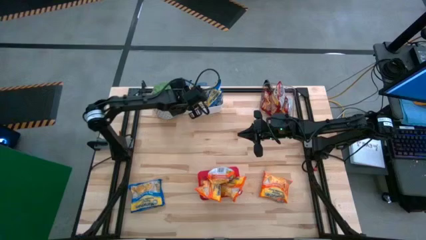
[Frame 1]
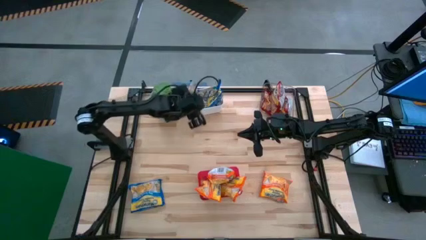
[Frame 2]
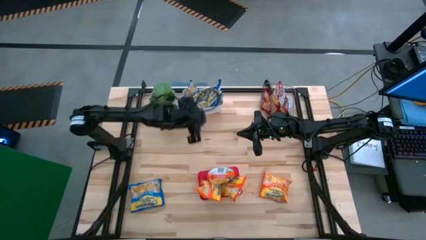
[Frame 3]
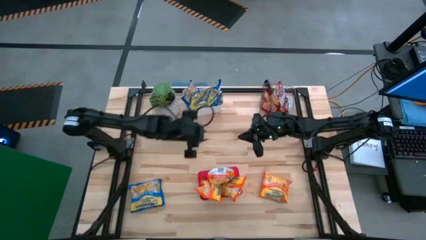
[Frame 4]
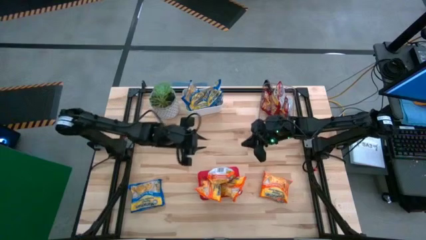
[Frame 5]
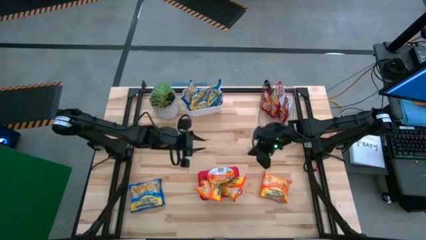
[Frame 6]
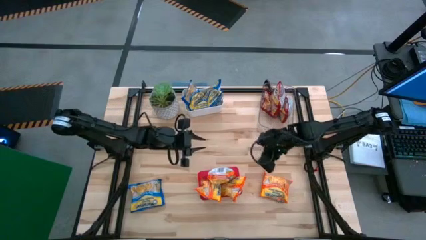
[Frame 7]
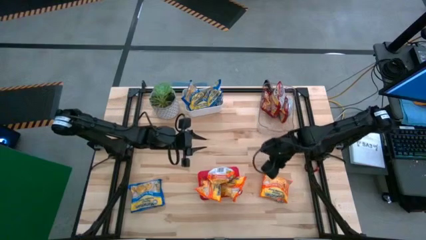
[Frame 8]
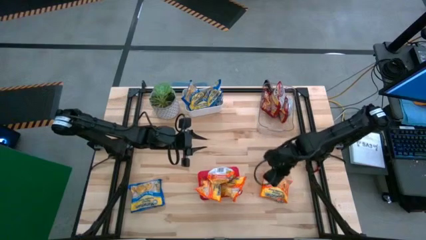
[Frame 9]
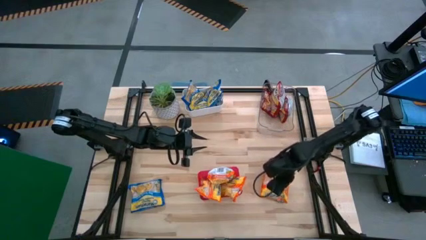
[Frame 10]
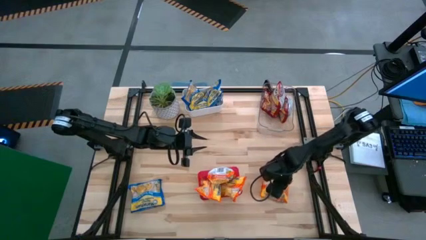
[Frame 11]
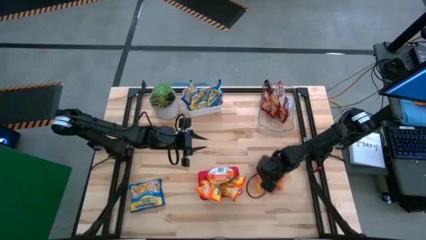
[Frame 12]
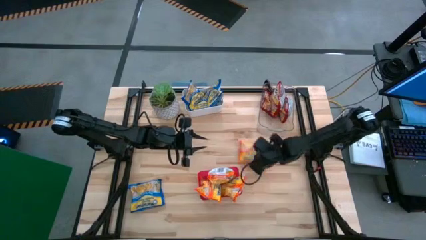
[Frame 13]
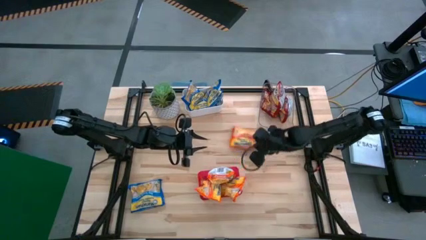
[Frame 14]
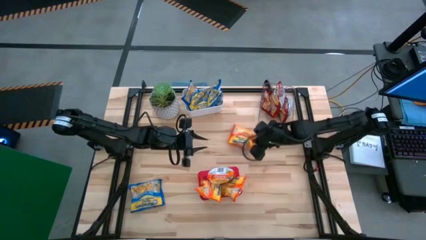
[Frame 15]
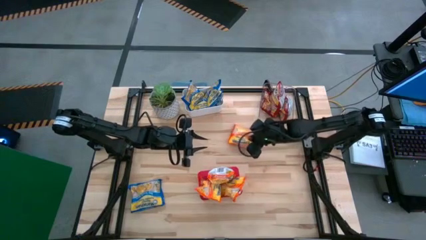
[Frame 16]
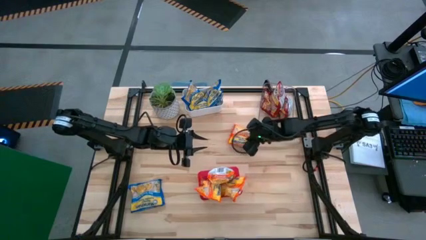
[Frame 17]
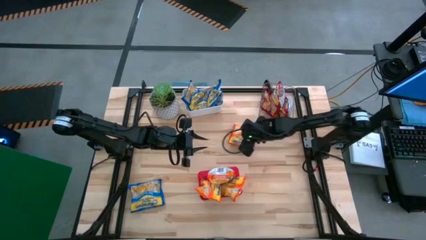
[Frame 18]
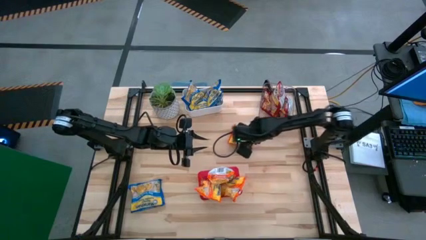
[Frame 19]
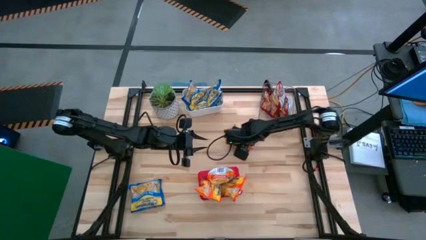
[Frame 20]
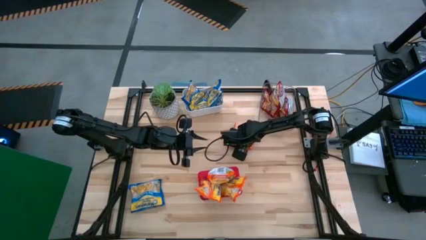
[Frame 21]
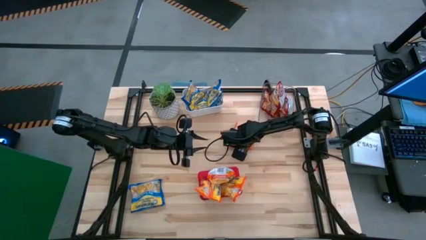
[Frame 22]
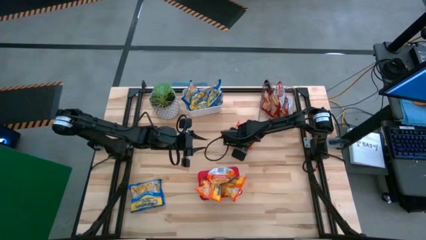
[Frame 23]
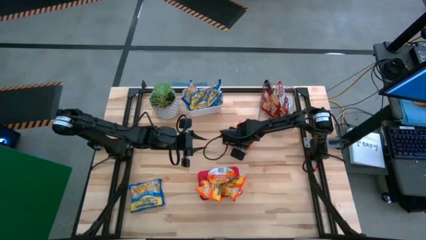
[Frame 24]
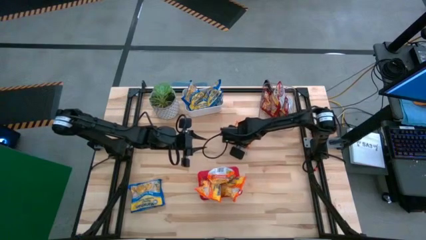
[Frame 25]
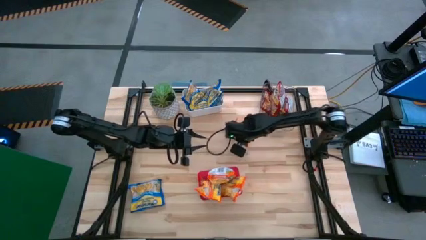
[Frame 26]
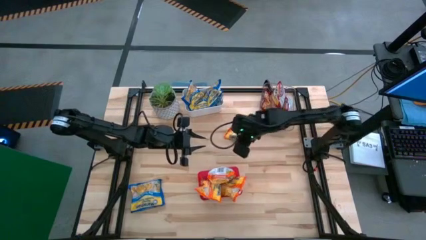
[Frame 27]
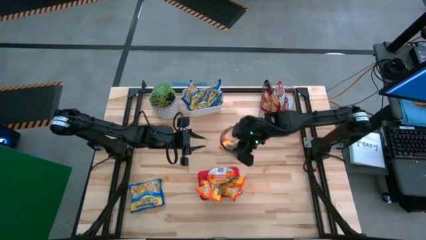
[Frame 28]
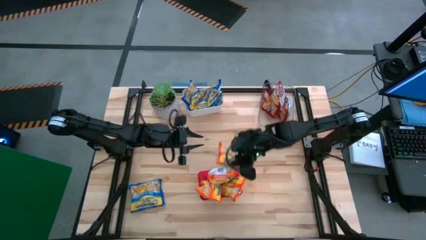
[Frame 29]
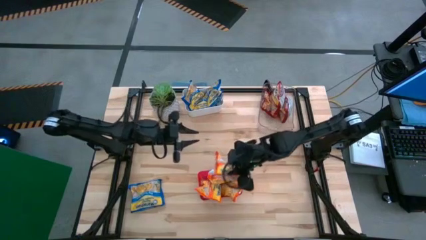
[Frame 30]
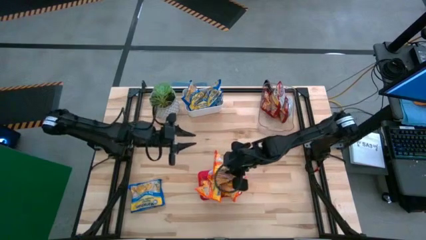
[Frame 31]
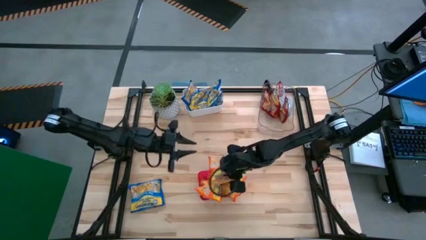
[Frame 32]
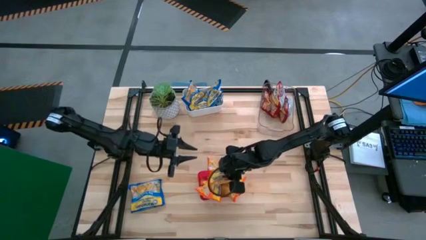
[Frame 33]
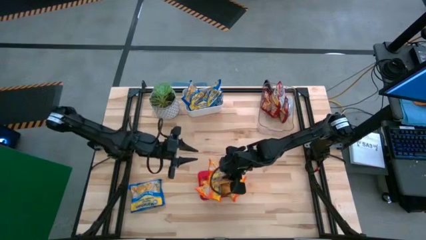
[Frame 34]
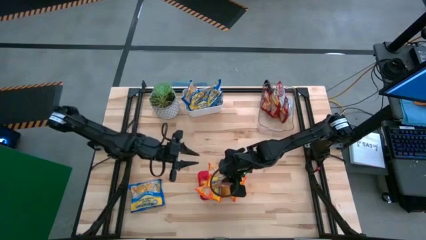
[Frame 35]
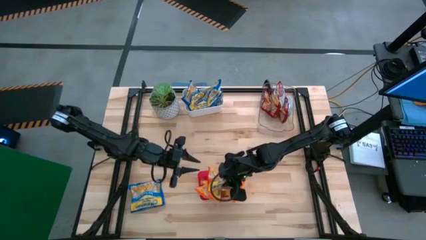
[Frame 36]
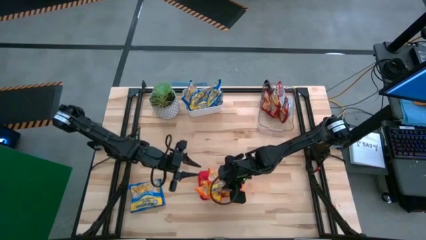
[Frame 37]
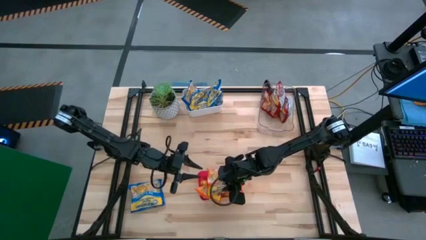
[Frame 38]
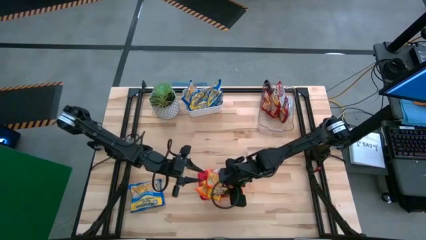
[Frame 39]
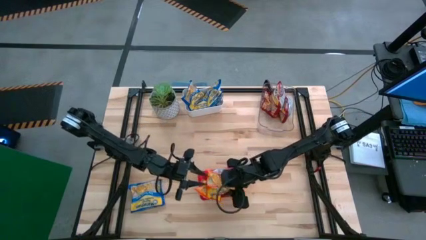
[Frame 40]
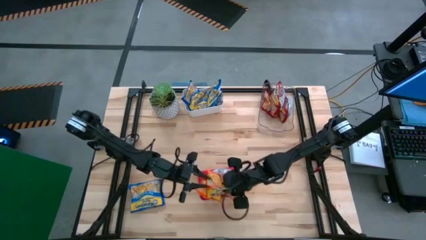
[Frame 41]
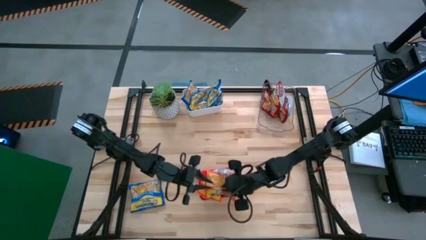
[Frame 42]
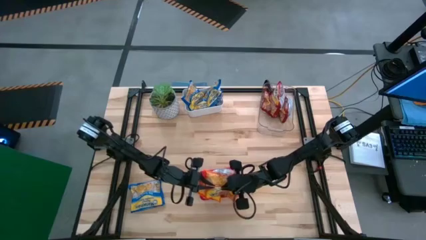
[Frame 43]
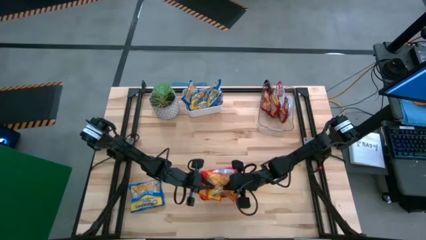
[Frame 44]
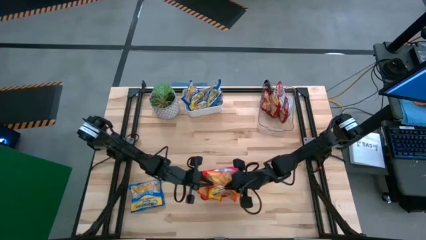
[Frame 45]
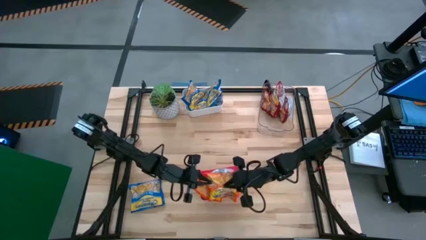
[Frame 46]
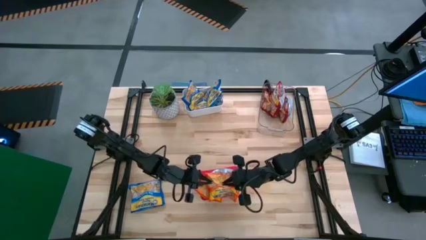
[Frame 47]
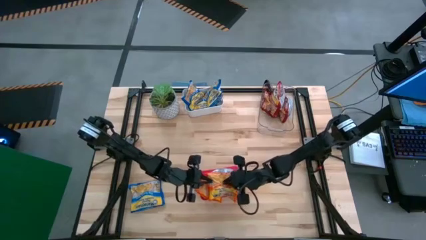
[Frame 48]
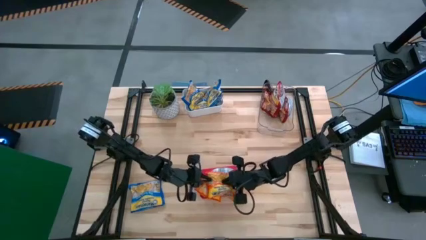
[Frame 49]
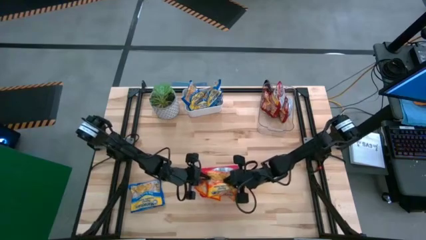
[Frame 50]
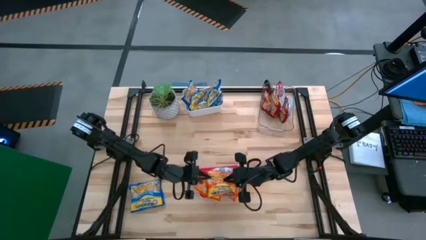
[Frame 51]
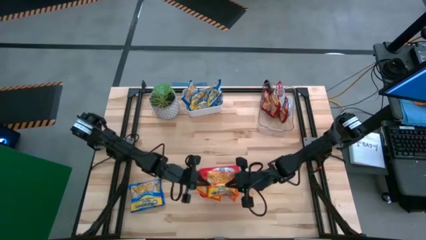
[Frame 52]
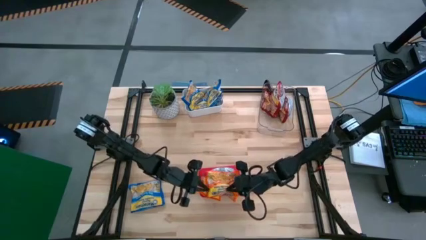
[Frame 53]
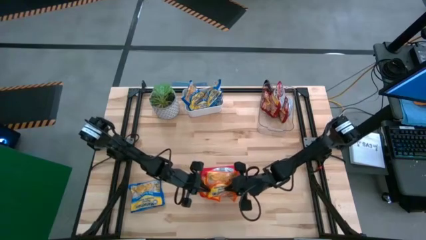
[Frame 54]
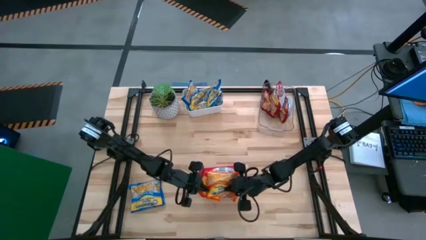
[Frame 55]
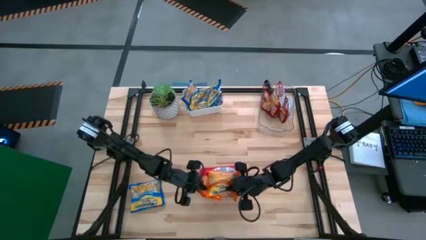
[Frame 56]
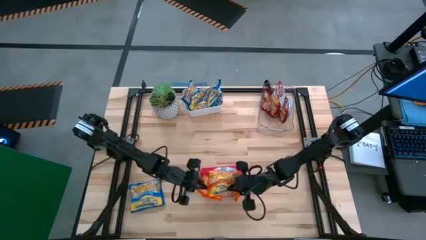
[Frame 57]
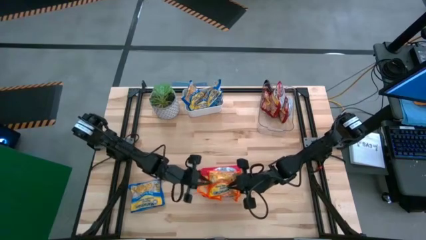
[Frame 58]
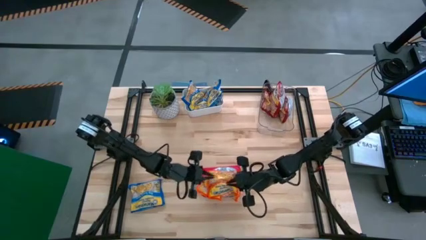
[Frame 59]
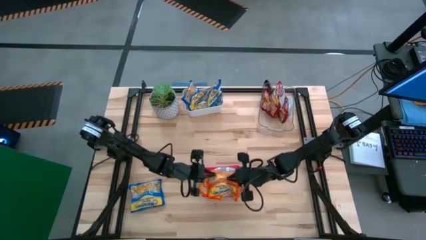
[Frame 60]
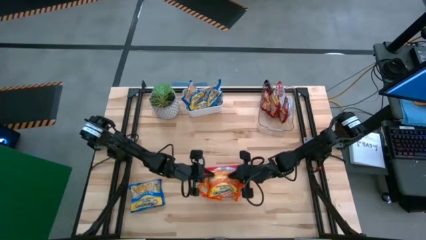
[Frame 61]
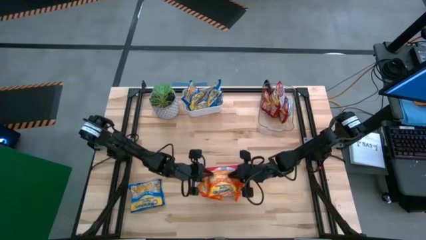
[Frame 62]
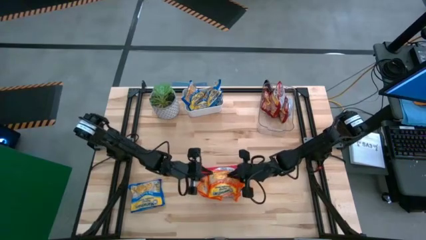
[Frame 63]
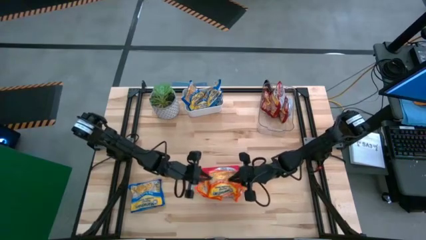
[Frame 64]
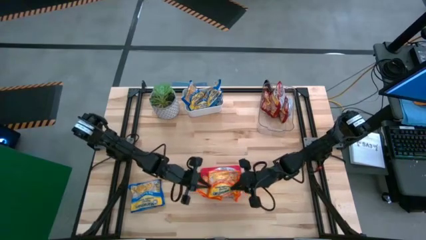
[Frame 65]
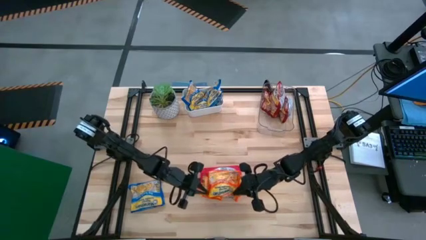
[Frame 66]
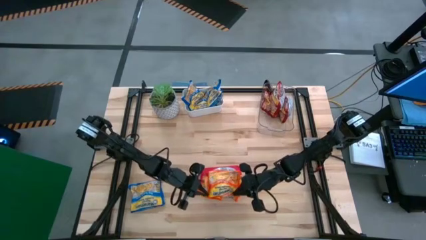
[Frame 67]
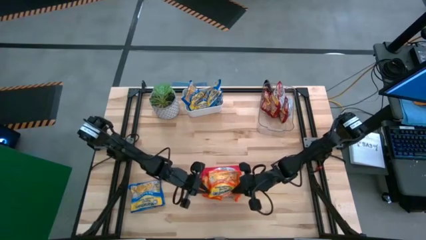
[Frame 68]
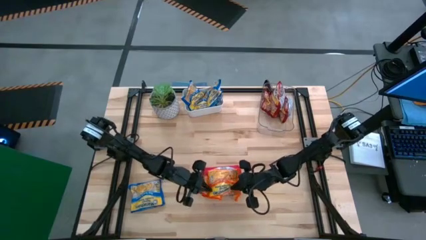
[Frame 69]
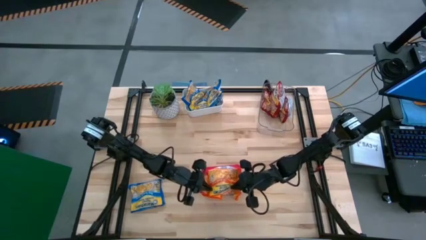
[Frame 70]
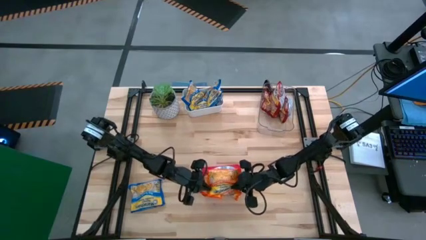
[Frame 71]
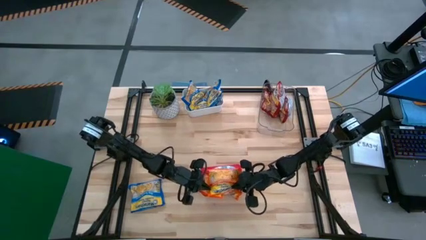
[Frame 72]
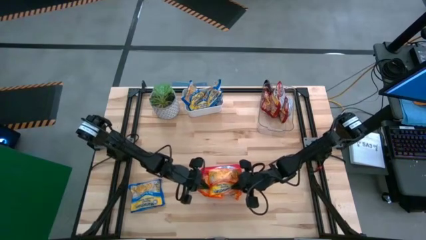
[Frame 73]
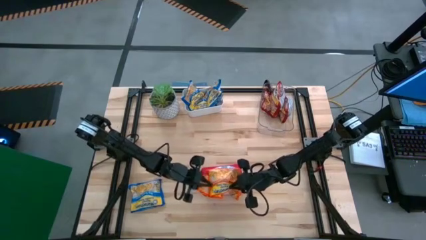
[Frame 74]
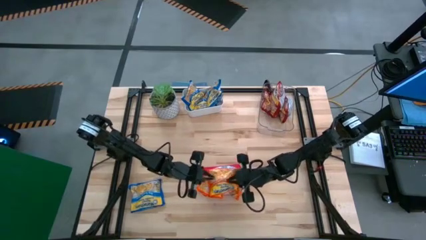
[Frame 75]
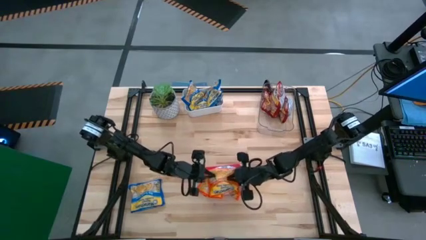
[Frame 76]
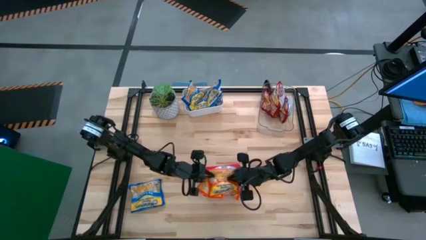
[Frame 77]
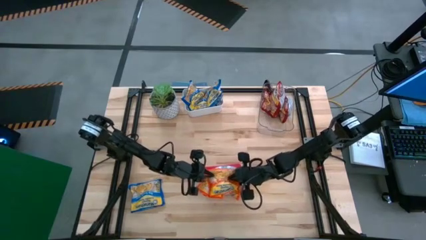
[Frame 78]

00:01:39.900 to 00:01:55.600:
Task: Sort Maruchan noodles
Put the orange noodle pack into the red bin

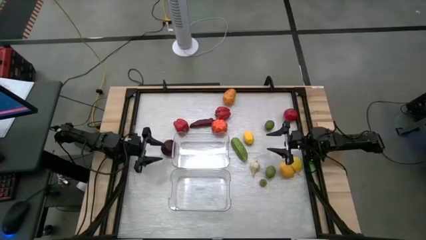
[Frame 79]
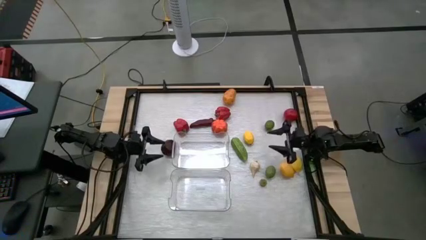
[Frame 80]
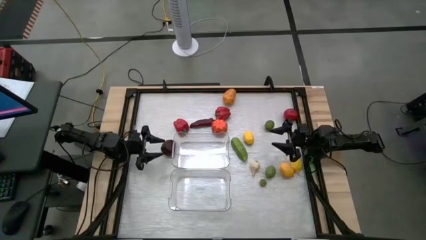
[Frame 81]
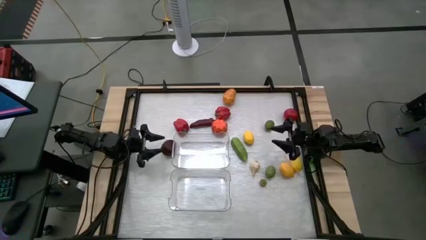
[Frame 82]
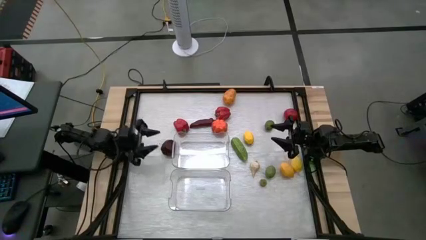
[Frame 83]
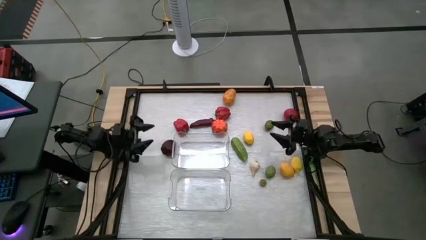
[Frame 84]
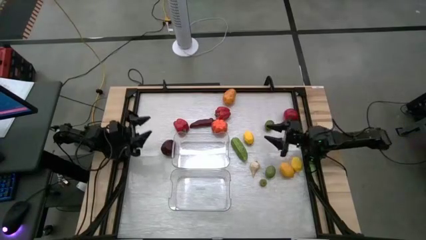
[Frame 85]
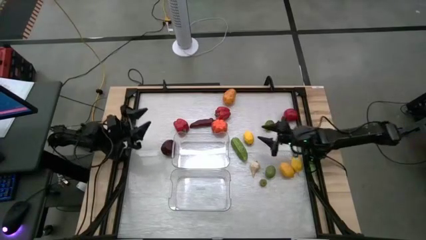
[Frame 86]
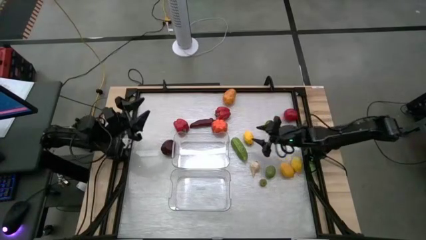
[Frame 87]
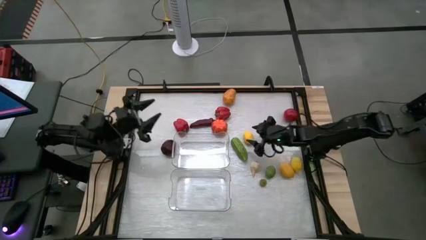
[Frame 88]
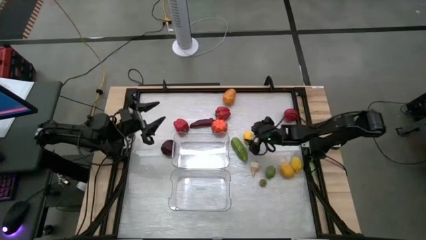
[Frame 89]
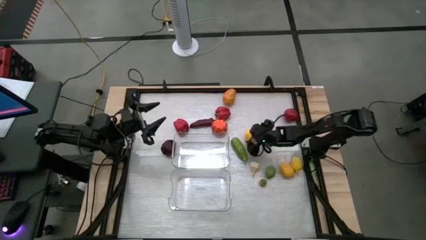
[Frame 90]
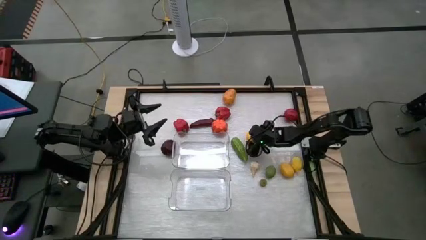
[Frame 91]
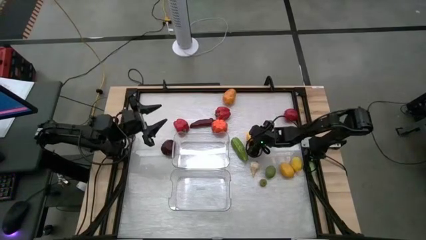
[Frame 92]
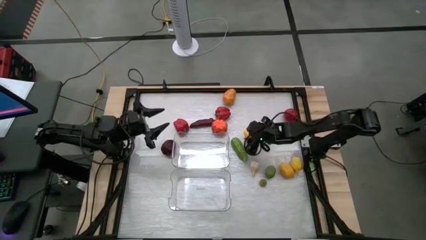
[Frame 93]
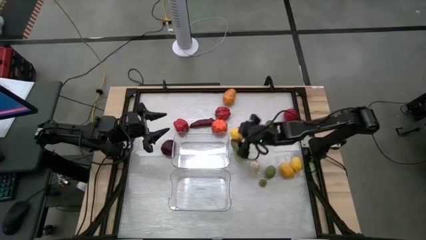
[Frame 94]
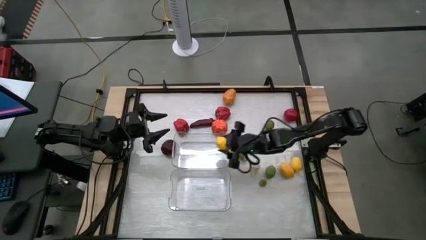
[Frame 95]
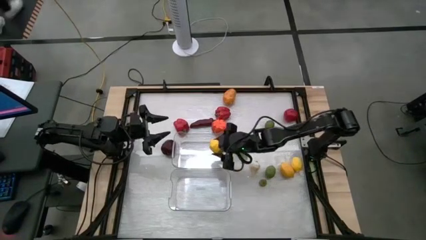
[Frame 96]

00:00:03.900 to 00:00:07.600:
Task: Sort produce into baskets
Put the lemon into the top transparent bin
